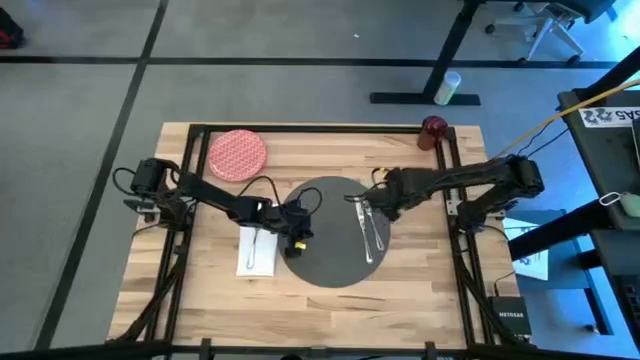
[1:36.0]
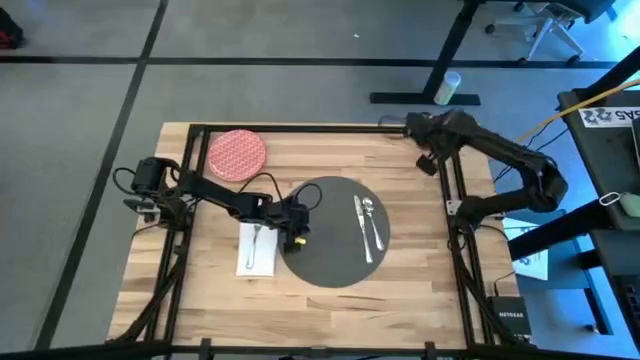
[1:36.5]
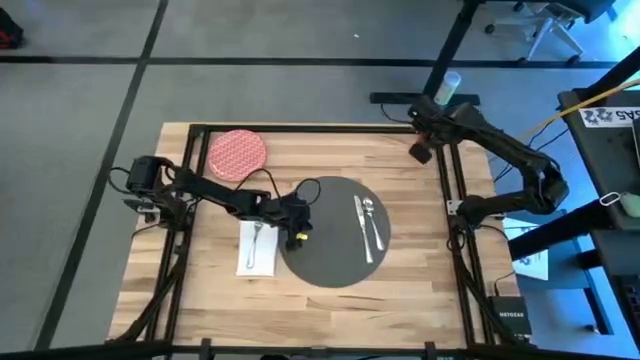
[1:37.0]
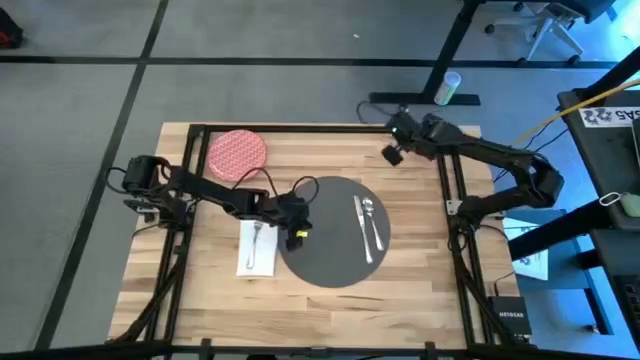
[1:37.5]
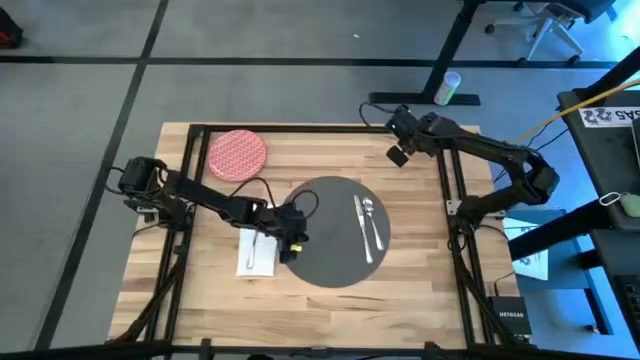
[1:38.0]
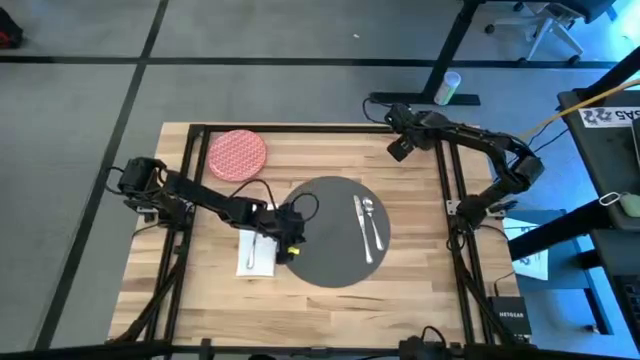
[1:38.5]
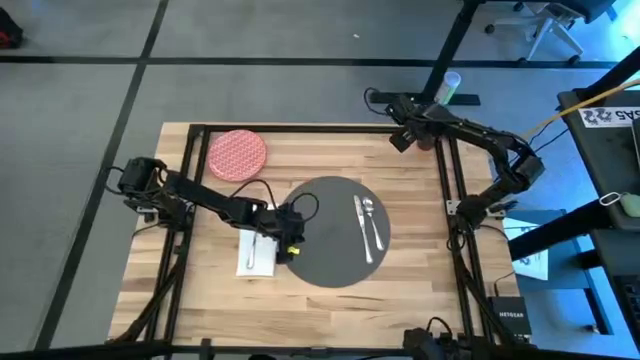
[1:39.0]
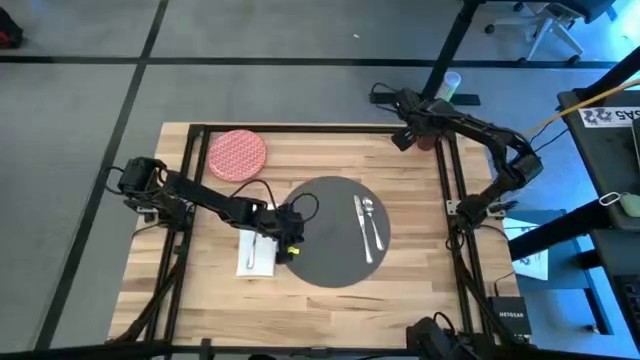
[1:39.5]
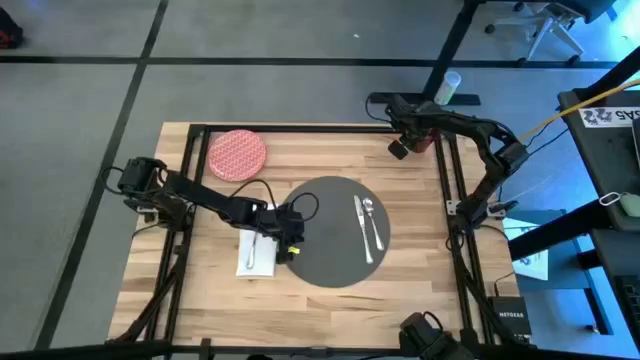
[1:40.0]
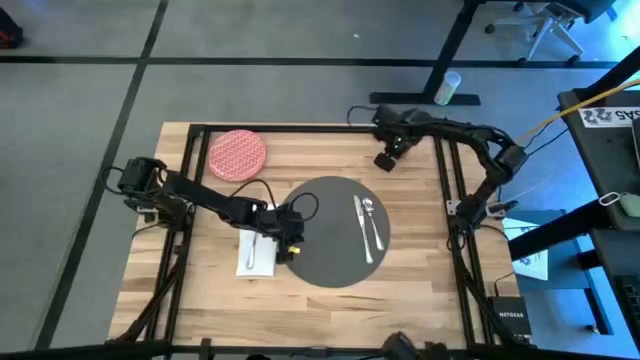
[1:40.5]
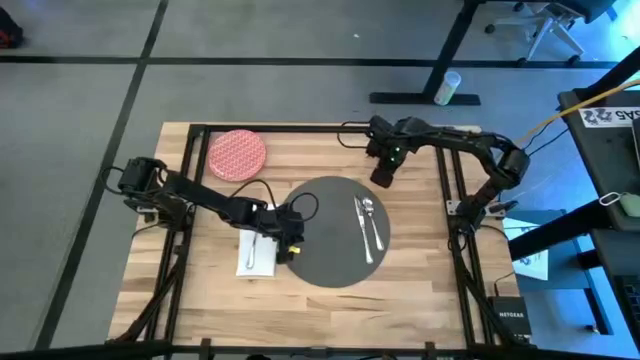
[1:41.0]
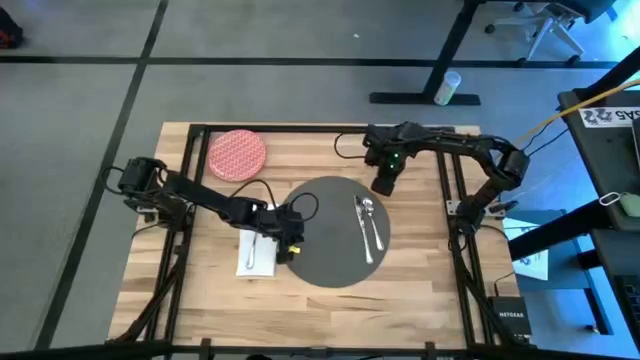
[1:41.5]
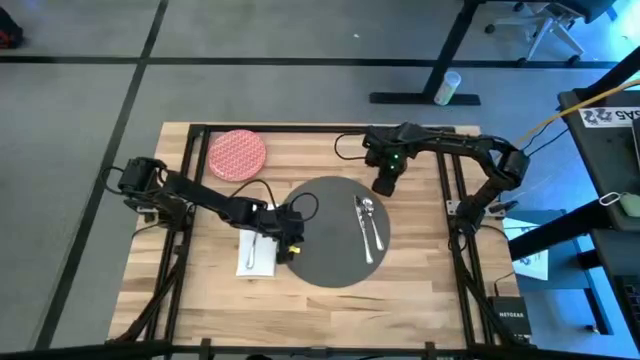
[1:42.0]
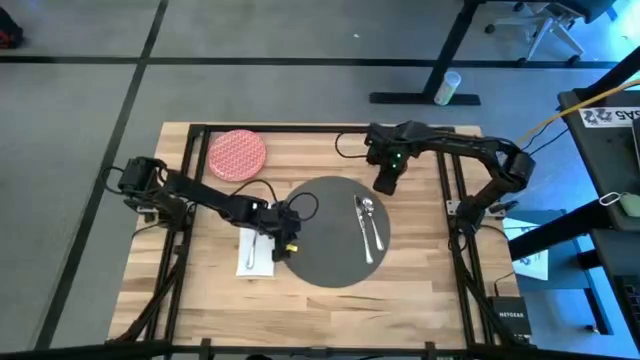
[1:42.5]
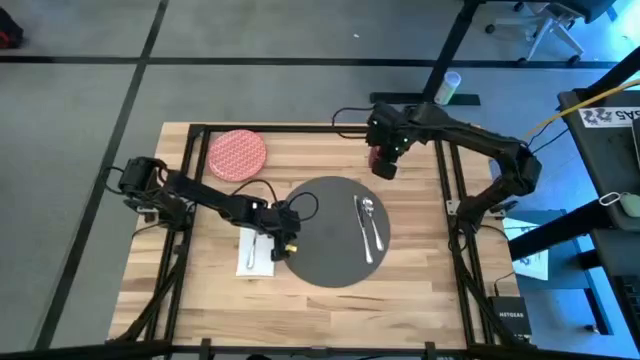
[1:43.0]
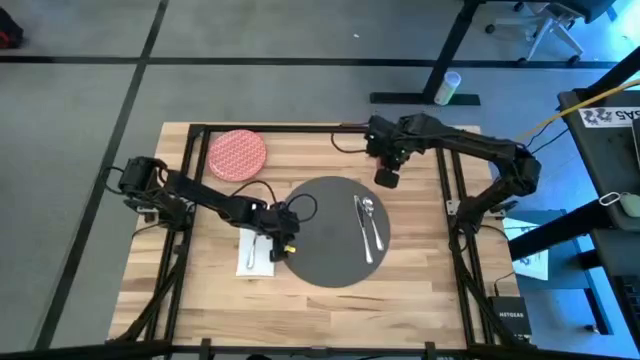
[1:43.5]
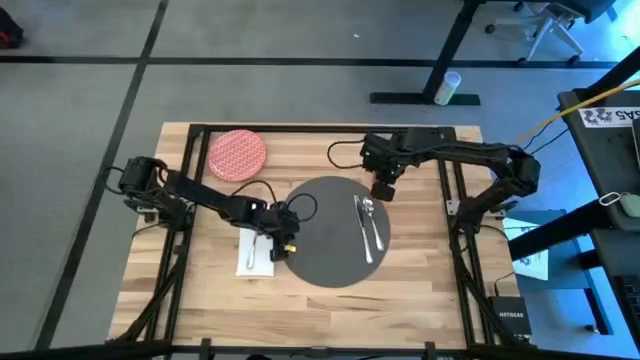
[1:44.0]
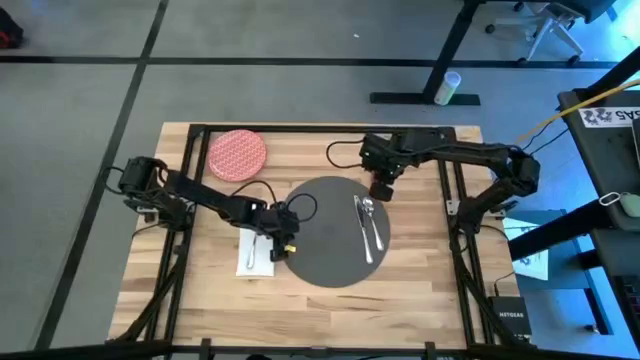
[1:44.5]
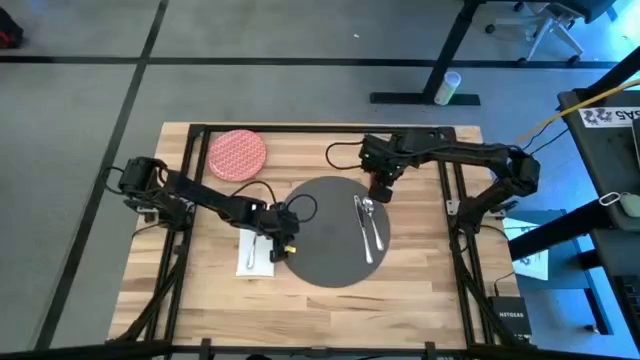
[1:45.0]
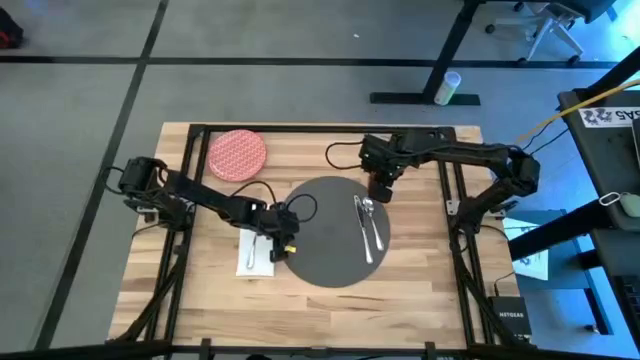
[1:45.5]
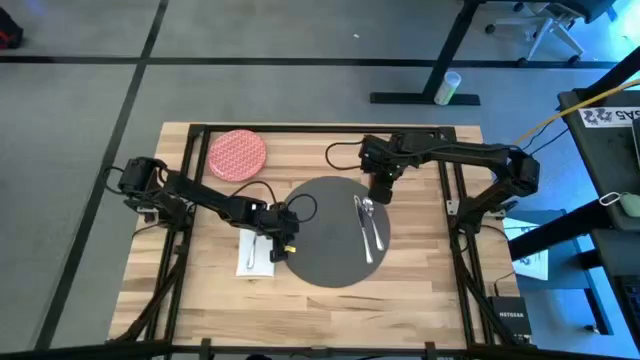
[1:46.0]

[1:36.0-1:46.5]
Task: Set table place
Move the red glass to the top right of the gray placemat

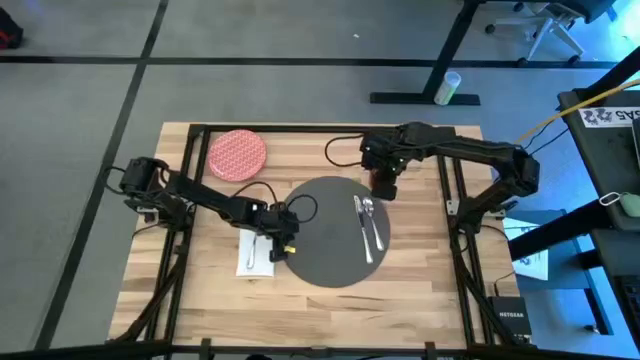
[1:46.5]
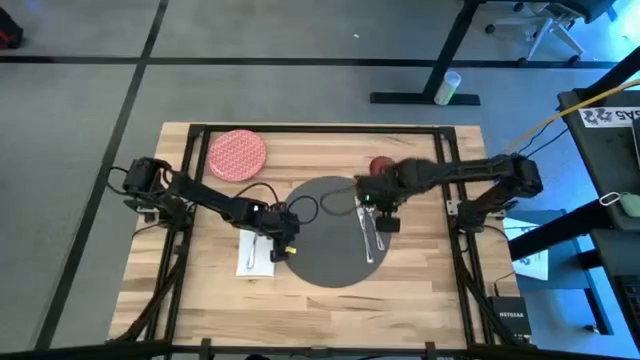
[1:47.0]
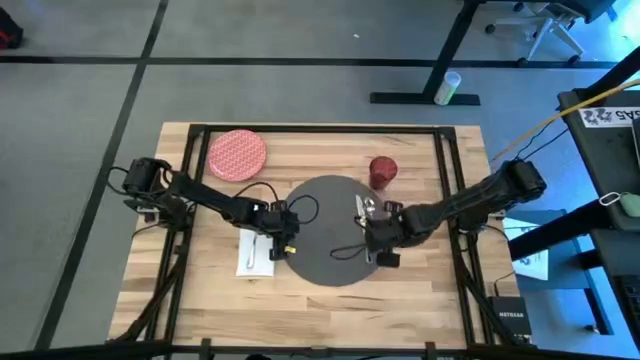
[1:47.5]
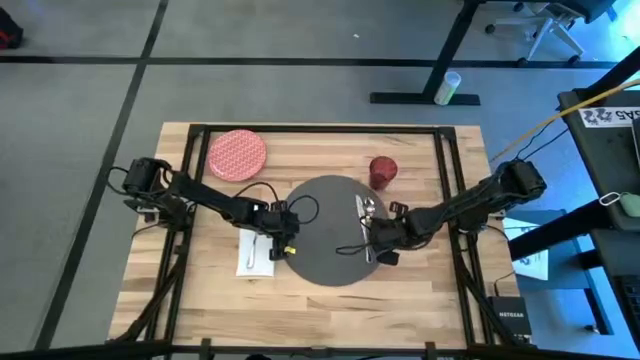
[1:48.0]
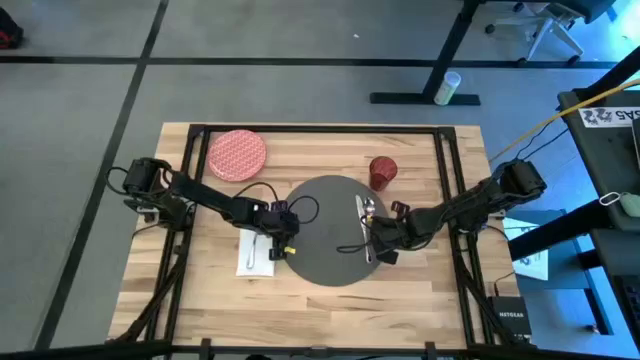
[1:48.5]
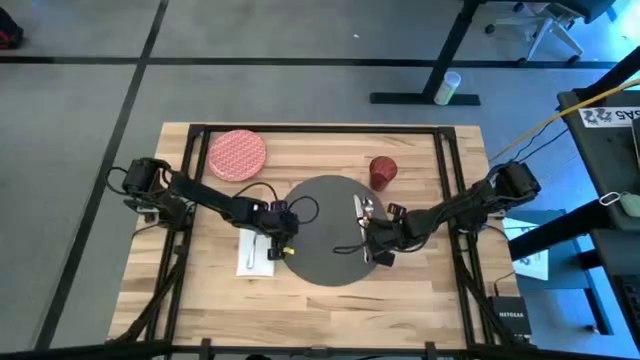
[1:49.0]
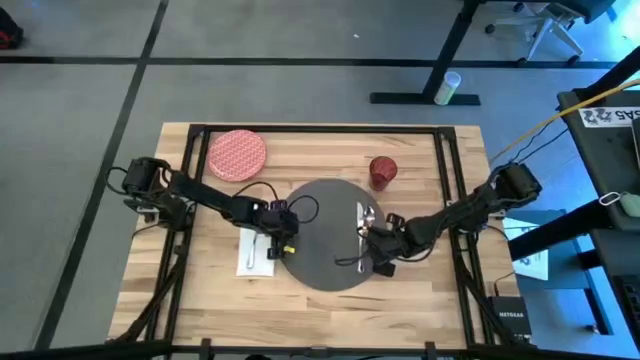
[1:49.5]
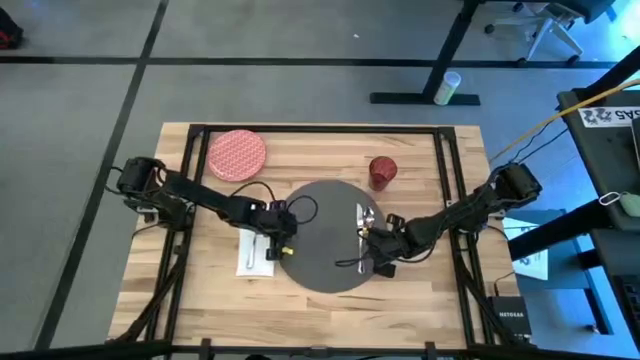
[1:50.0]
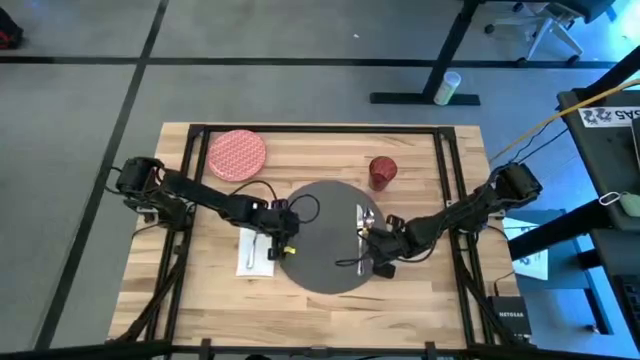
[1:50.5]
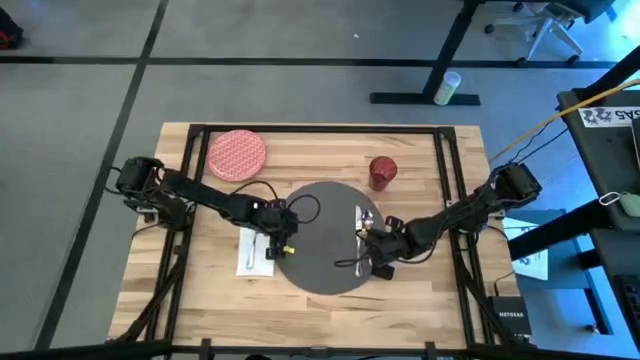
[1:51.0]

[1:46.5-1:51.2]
Adjust the placemat

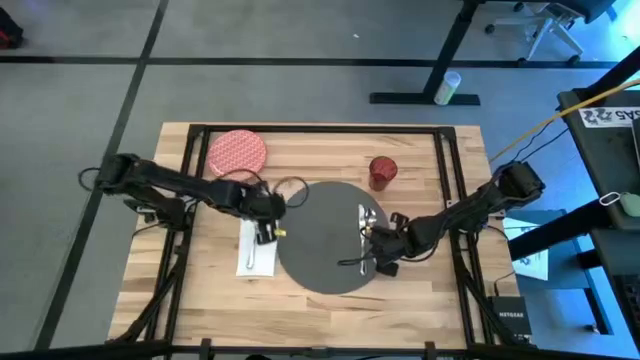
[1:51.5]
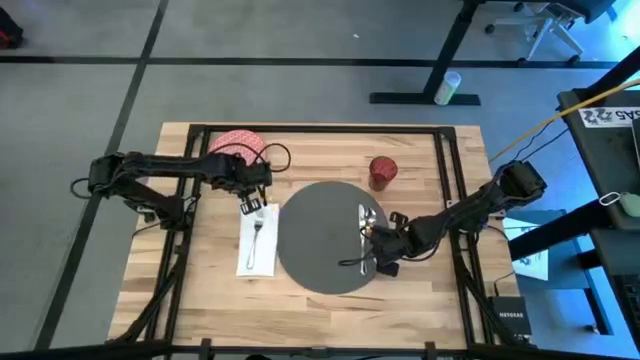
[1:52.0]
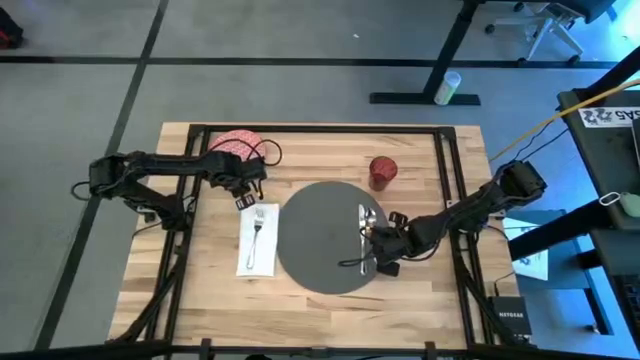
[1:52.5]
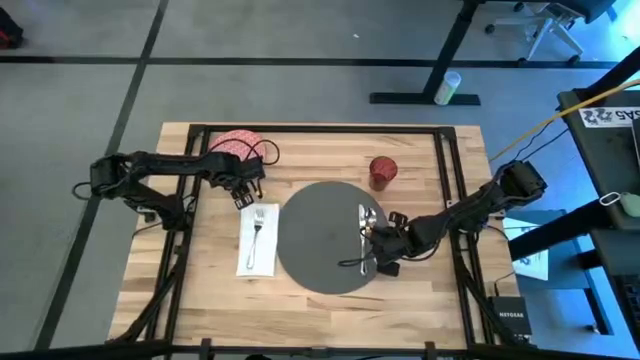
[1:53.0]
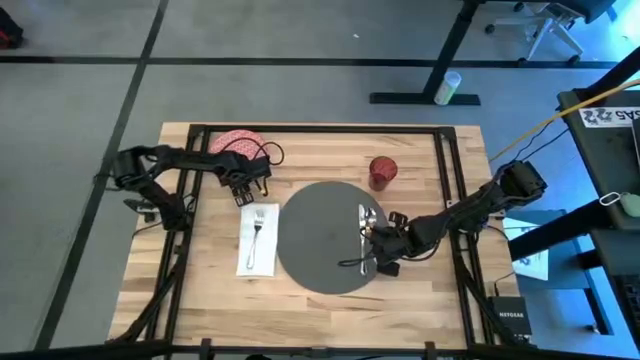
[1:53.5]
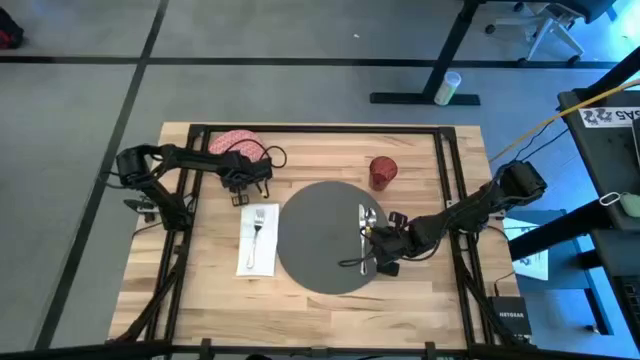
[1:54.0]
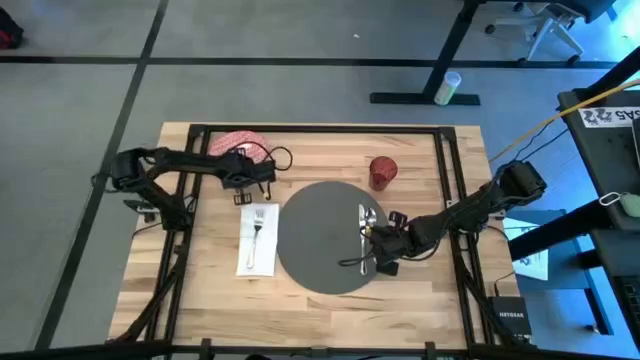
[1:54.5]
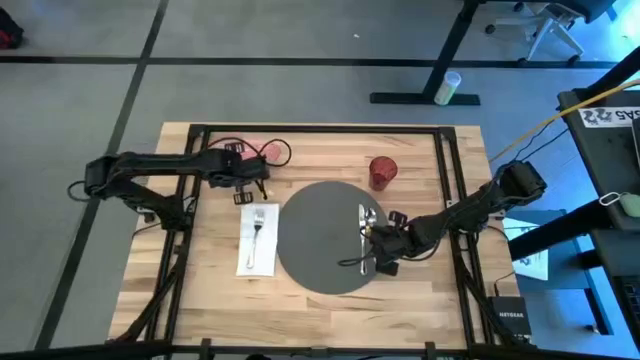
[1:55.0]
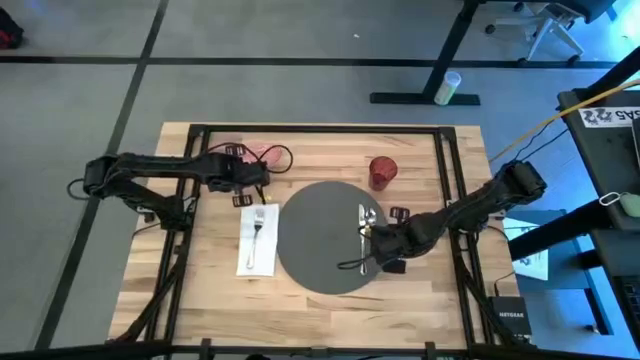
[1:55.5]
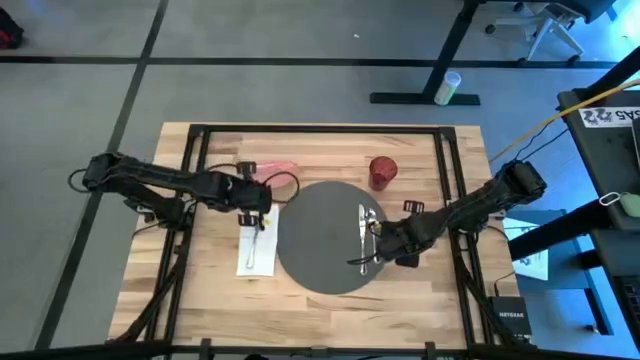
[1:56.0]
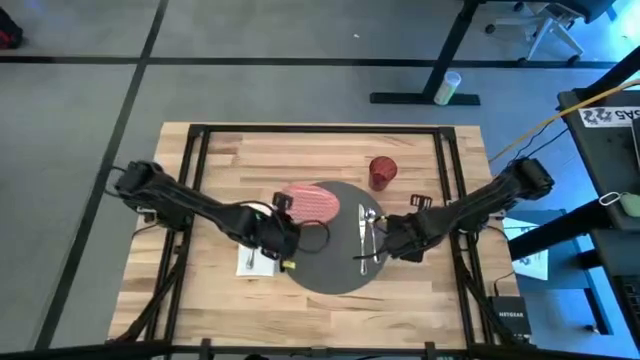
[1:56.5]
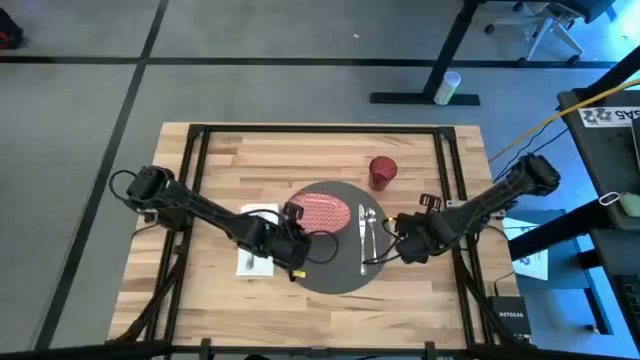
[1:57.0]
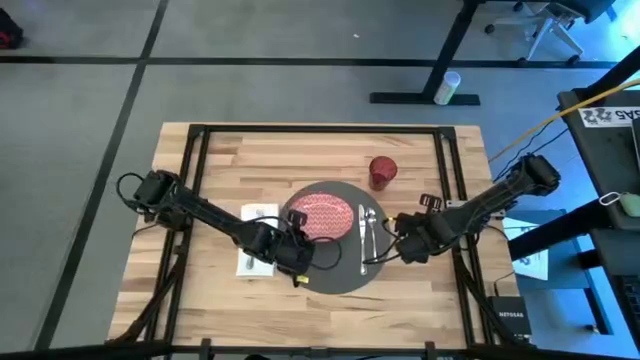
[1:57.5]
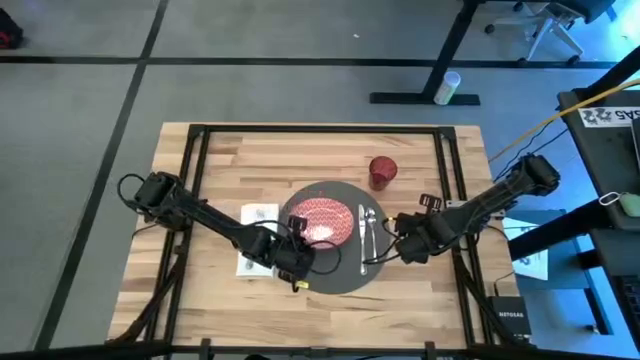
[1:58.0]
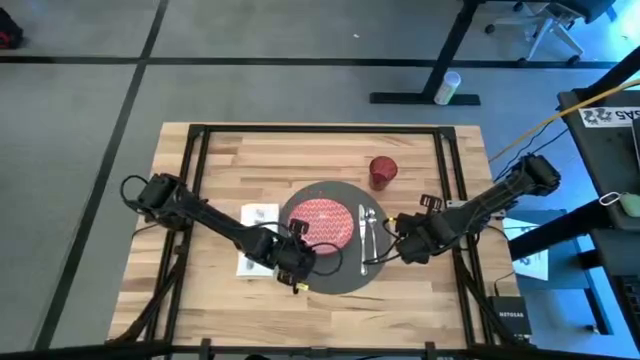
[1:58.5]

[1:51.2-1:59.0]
Put the red plate on the center of the gray placemat
